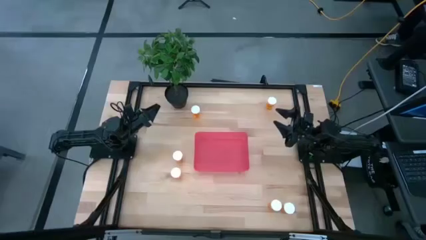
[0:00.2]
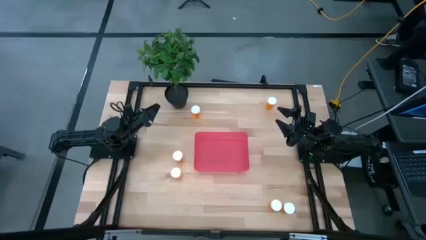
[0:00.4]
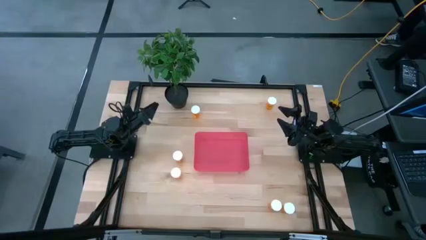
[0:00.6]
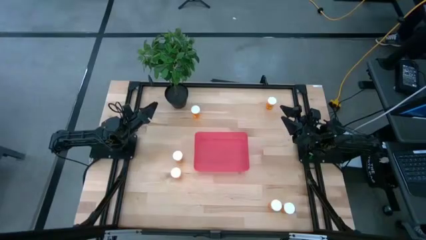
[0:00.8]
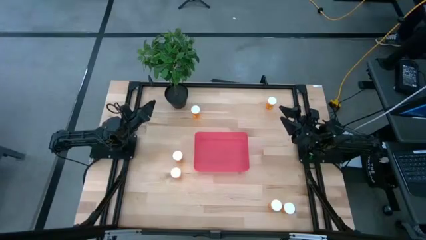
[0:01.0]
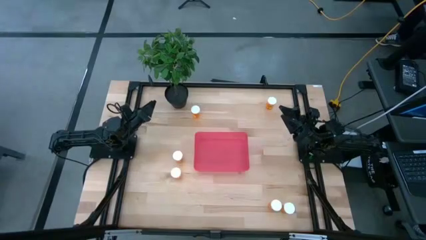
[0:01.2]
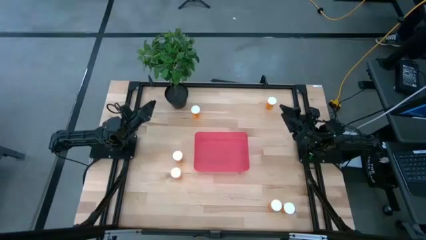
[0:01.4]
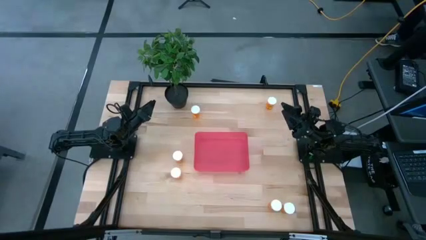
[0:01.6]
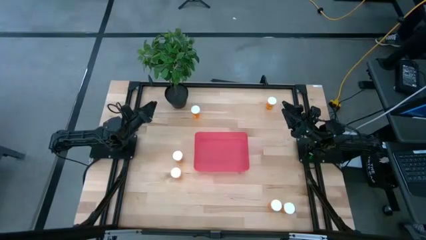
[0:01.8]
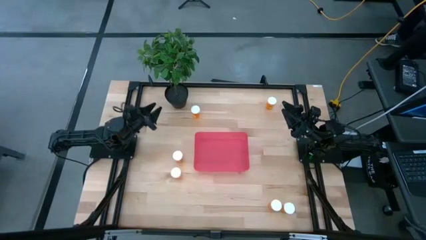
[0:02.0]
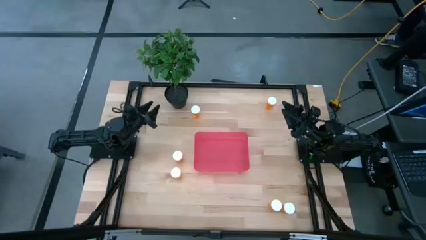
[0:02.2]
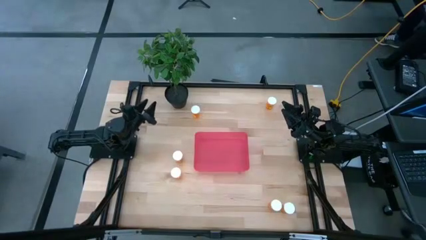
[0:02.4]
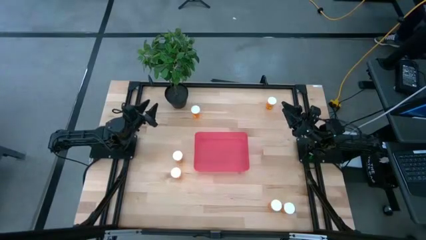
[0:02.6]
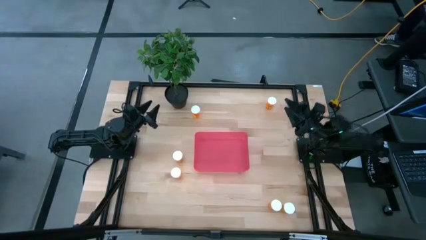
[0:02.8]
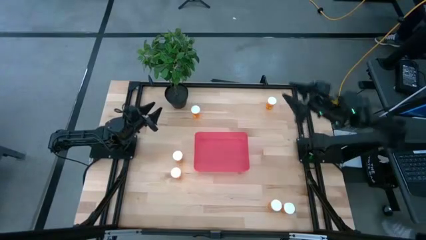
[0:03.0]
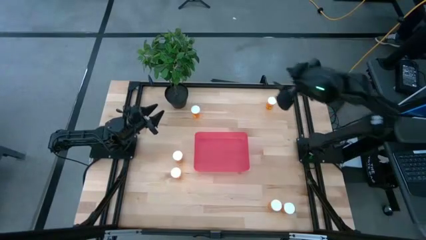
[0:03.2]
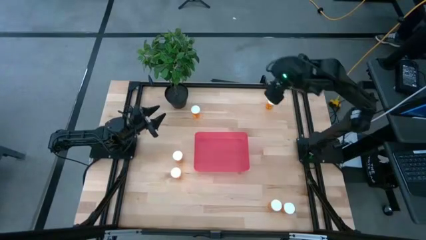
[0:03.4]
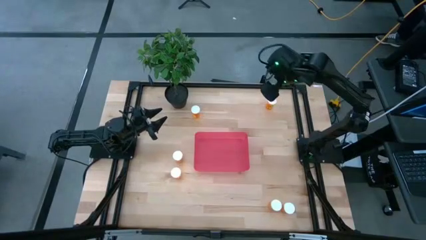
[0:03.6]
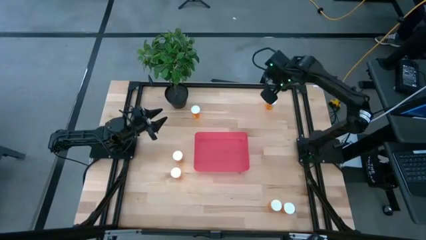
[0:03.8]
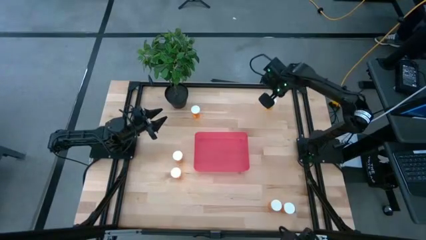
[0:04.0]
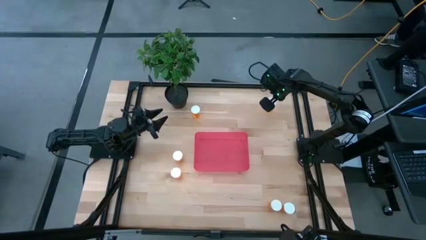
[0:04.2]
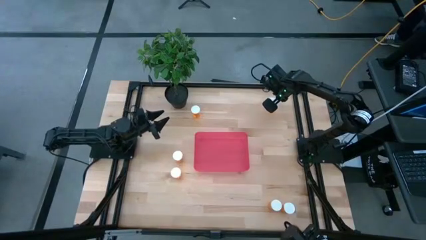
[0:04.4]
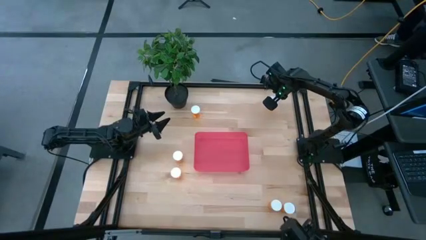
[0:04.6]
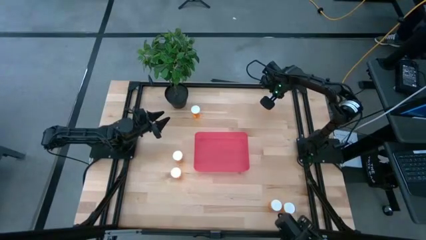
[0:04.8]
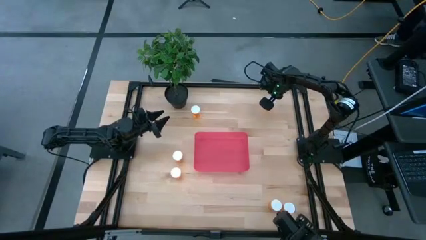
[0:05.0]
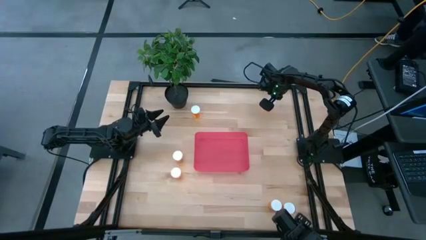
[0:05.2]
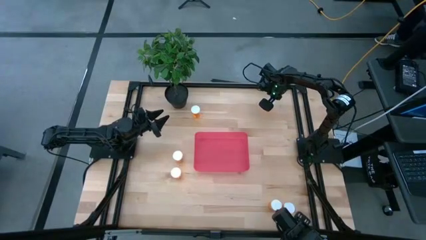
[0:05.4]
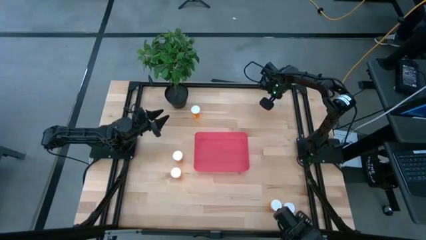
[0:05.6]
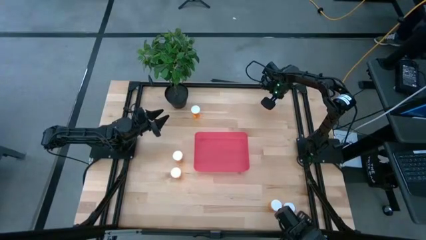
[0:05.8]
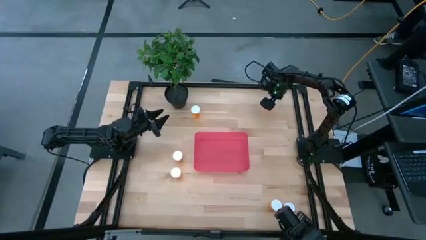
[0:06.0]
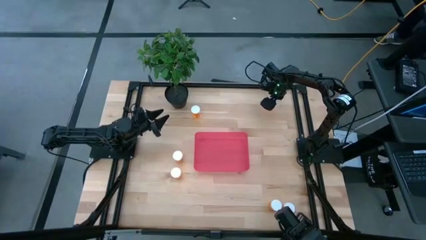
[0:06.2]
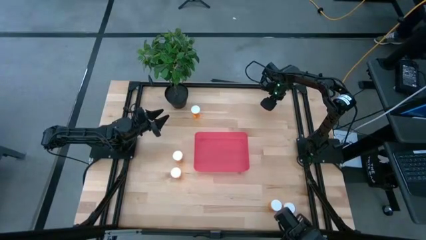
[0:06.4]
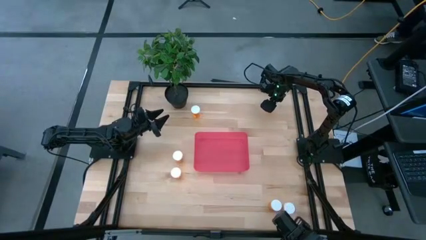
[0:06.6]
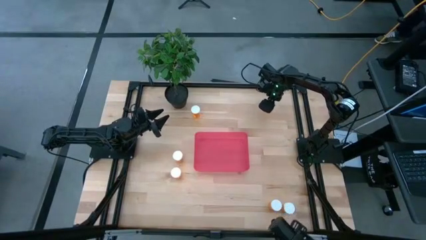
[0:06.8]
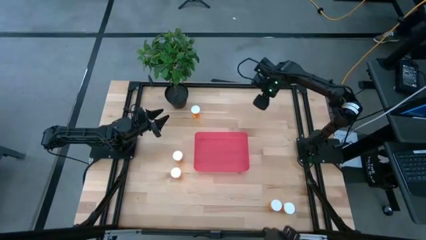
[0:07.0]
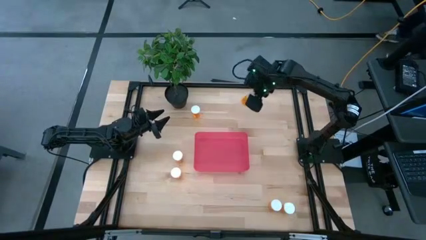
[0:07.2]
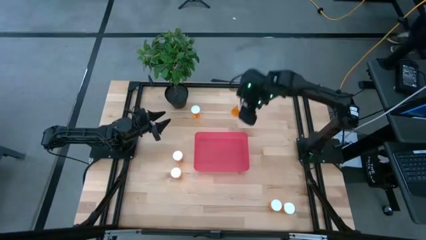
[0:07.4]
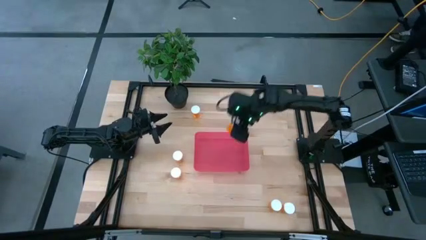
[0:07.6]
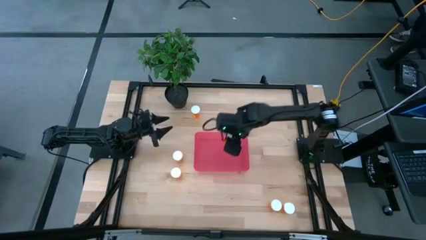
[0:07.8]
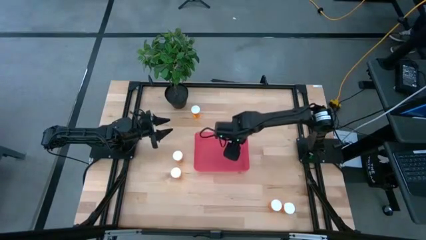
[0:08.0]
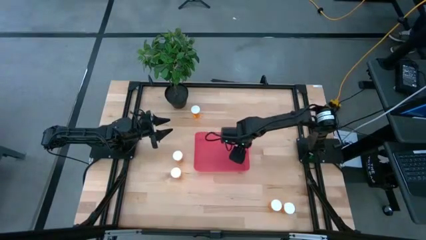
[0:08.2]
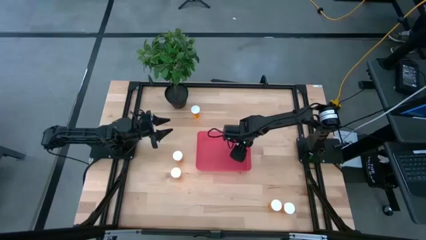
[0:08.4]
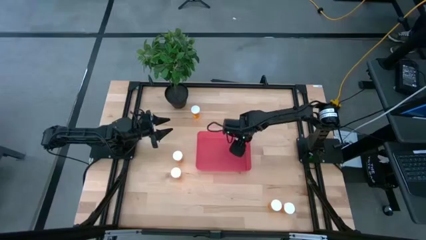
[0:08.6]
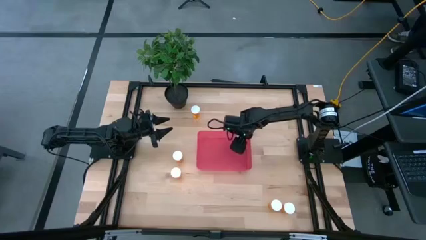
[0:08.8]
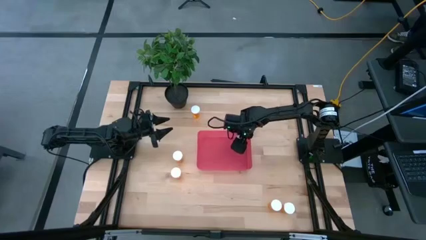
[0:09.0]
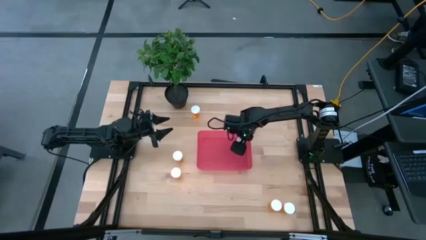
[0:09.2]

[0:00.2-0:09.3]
Task: Pick and place pill bottles into a basket
Put the orange pill bottle into the red bin

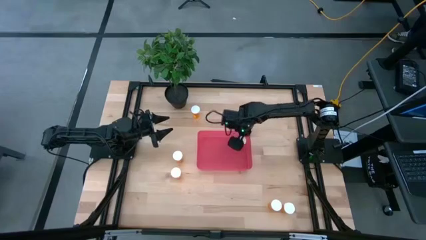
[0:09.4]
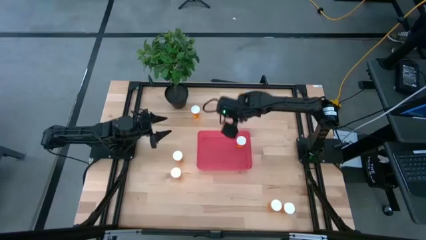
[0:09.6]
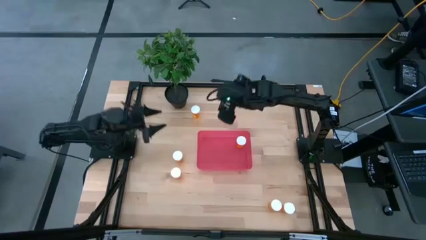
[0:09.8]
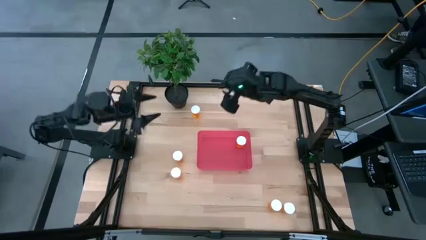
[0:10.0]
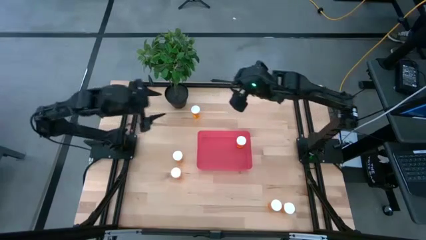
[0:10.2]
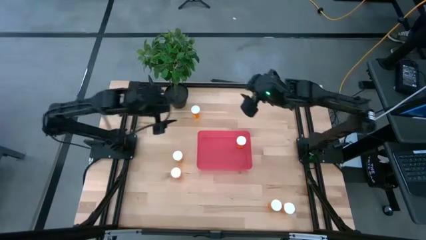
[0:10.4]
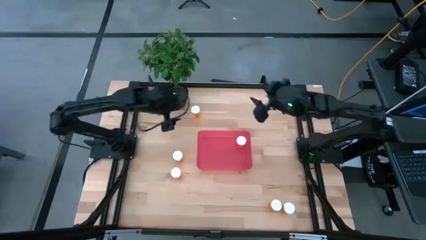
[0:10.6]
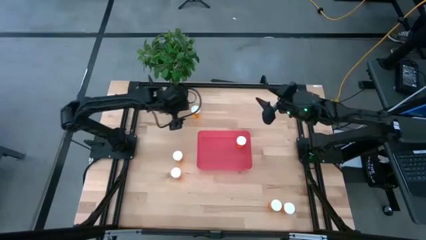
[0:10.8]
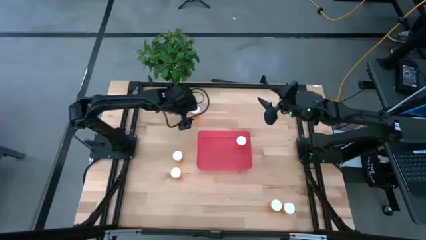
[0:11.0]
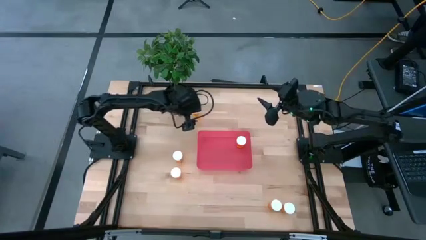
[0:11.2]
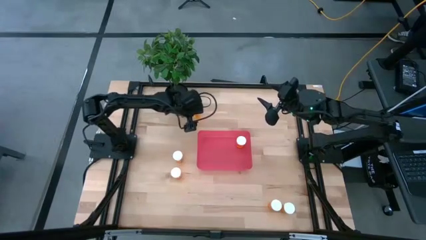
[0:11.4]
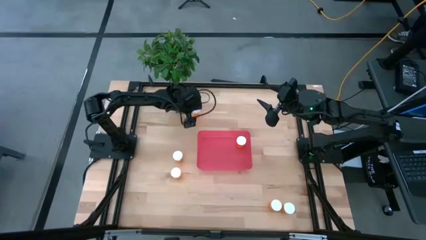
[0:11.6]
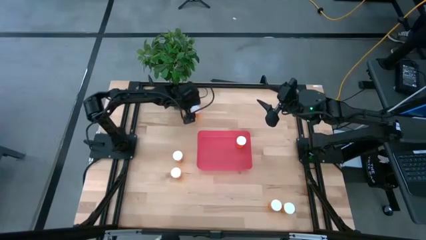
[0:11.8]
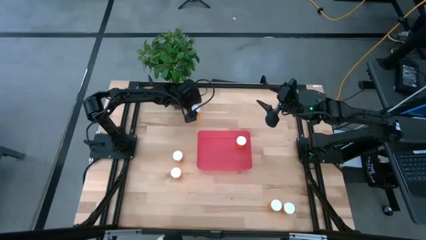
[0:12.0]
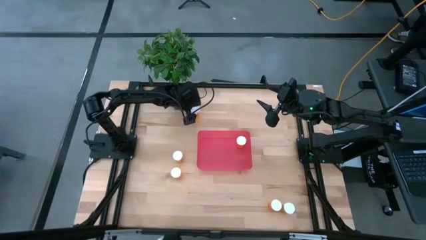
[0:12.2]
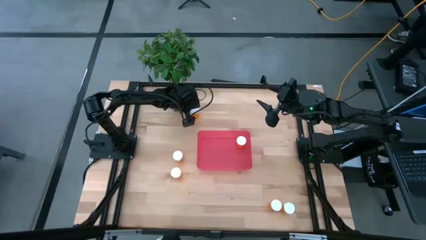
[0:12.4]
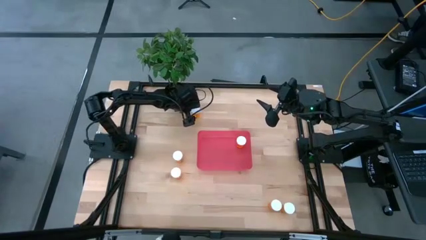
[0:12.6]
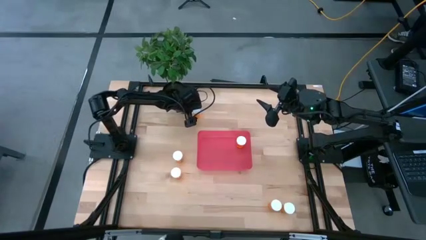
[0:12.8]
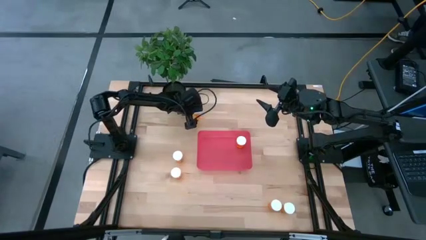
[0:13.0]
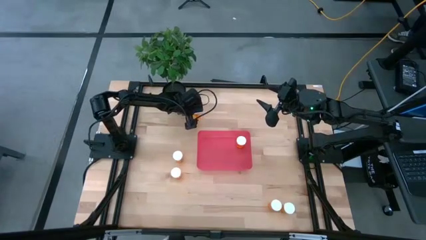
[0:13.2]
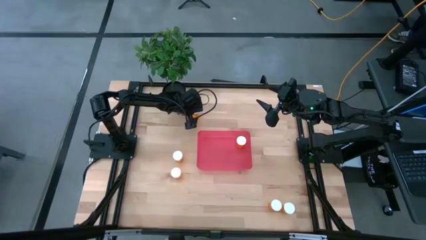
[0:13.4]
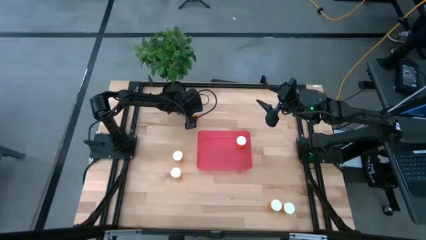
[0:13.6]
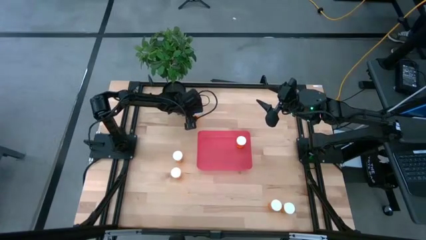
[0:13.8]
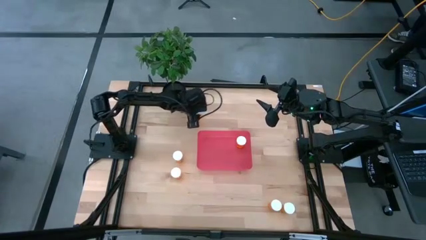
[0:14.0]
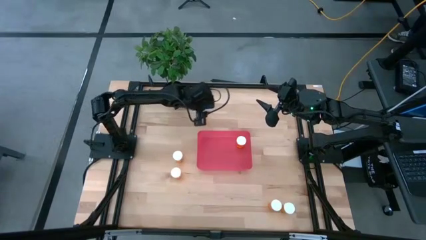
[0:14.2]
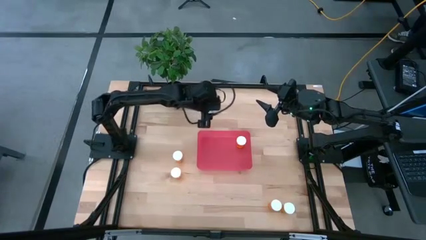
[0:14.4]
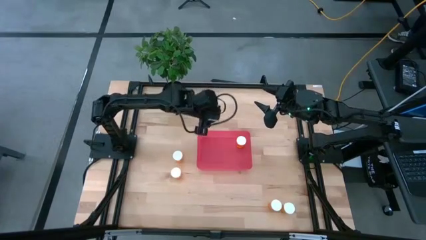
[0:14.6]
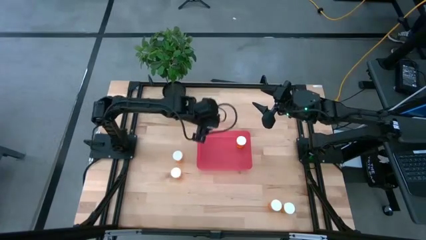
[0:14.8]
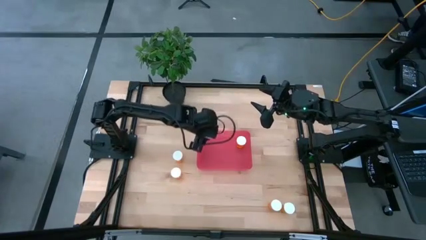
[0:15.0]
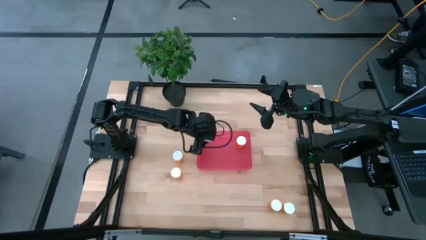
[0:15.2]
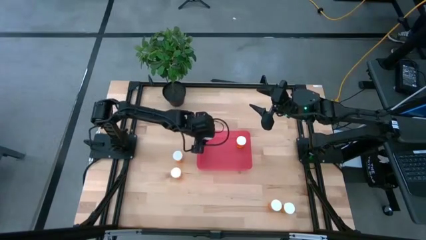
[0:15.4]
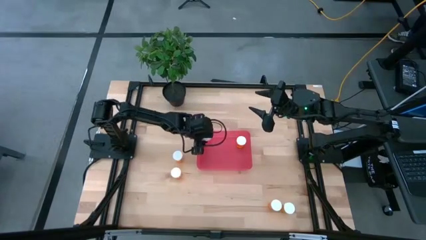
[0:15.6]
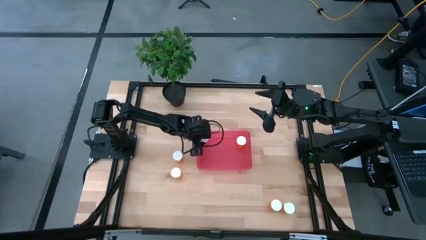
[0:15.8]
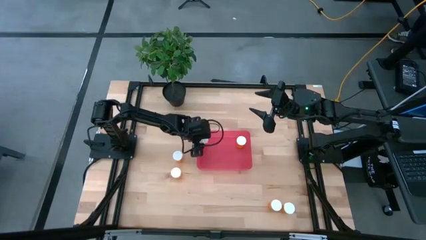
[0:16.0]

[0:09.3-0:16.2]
Put the orange pill bottle into the red bin
